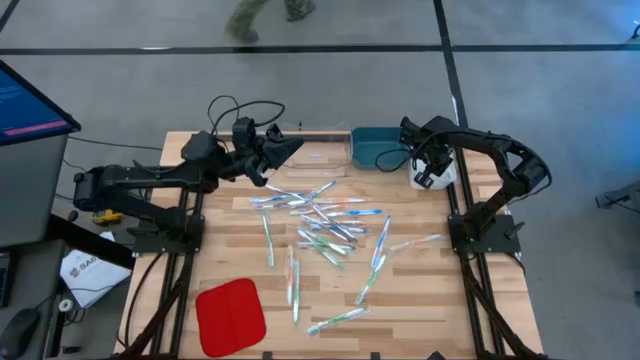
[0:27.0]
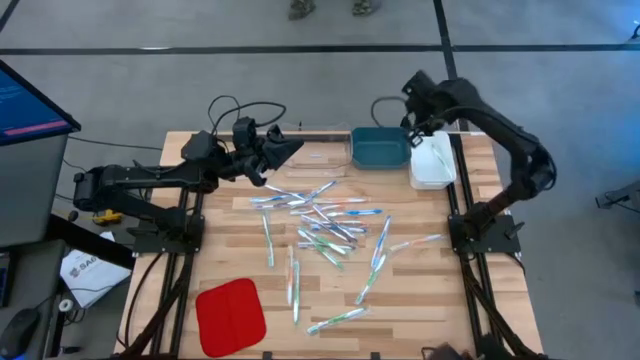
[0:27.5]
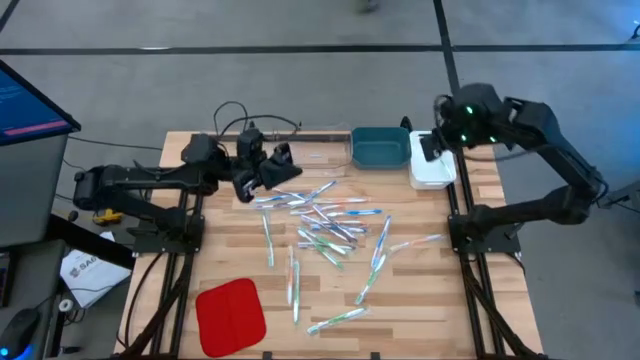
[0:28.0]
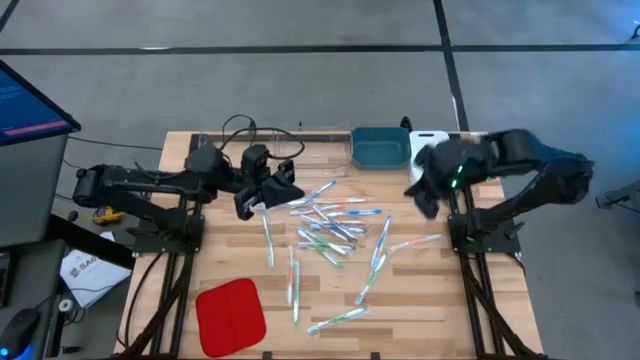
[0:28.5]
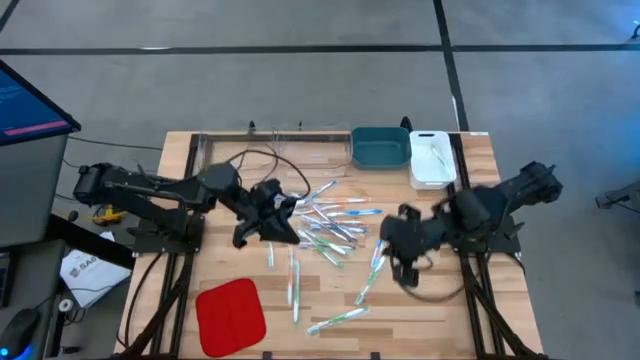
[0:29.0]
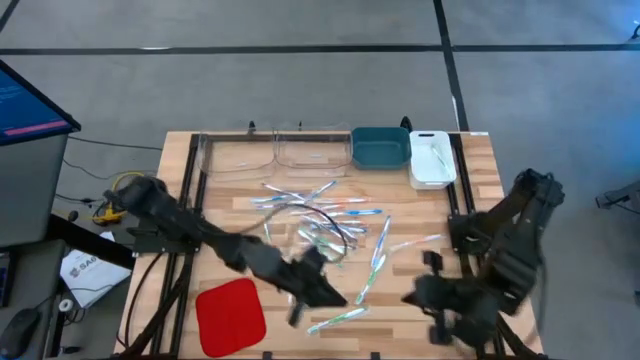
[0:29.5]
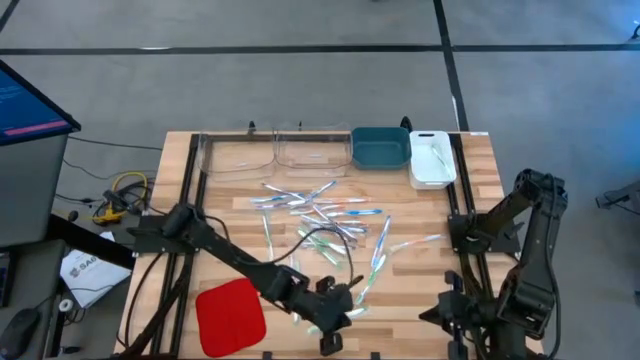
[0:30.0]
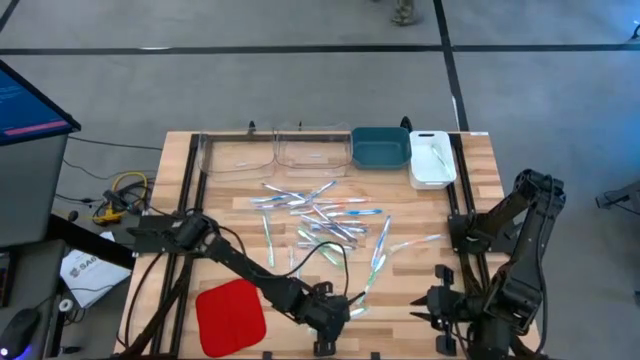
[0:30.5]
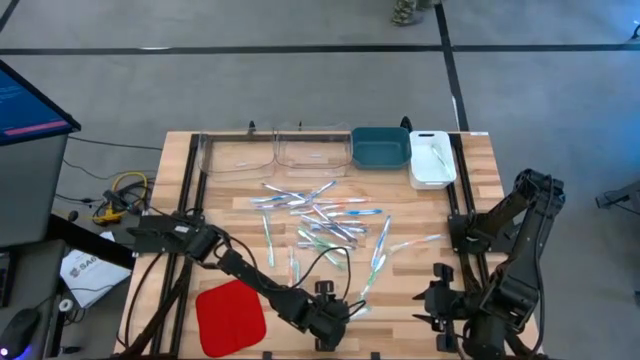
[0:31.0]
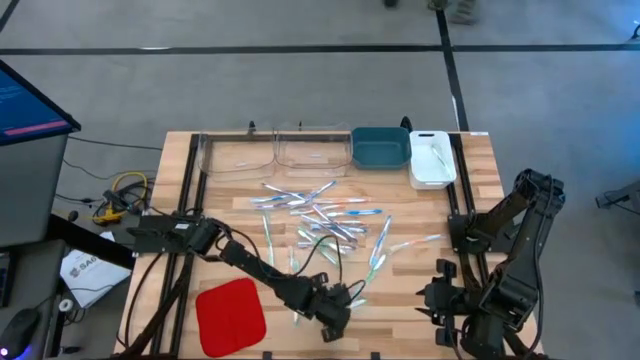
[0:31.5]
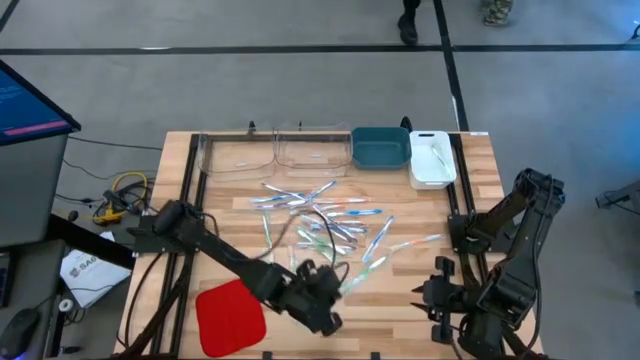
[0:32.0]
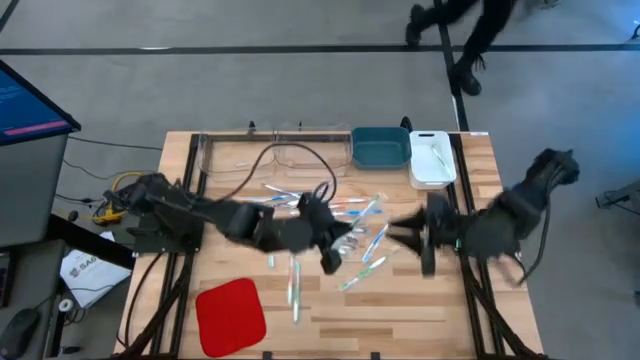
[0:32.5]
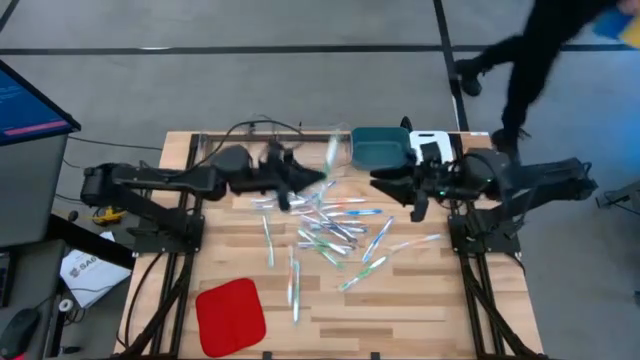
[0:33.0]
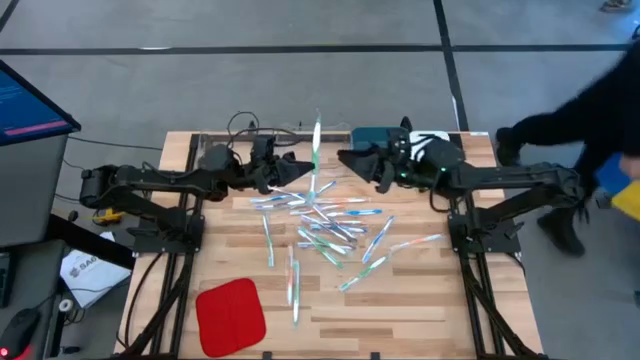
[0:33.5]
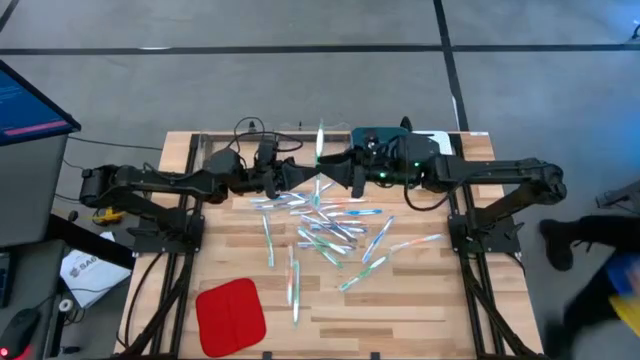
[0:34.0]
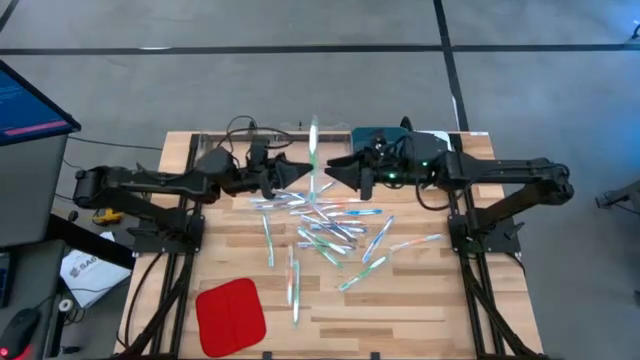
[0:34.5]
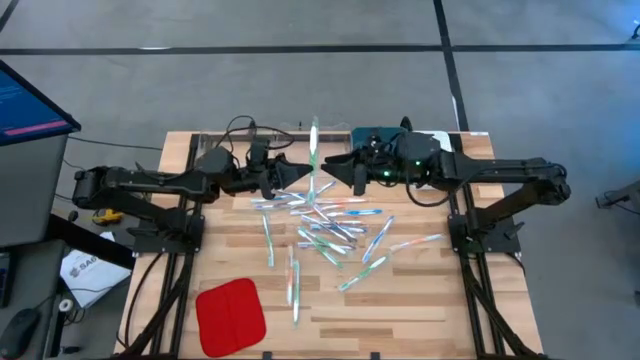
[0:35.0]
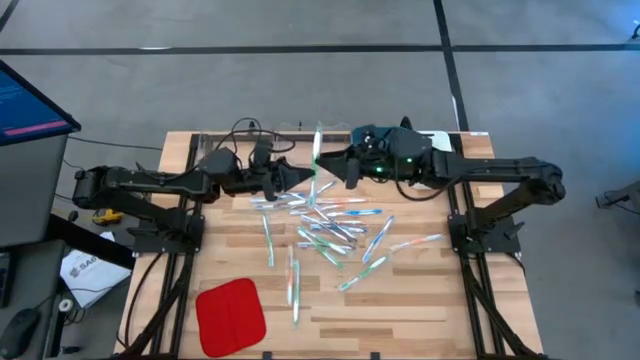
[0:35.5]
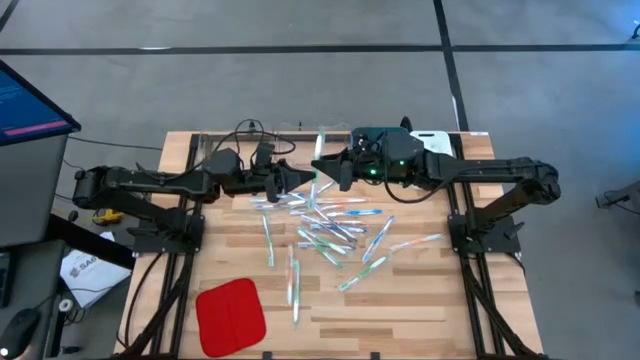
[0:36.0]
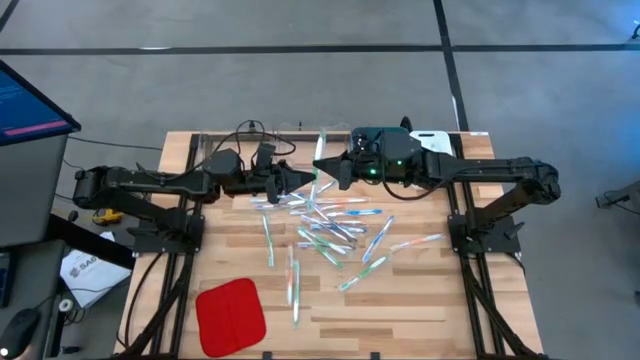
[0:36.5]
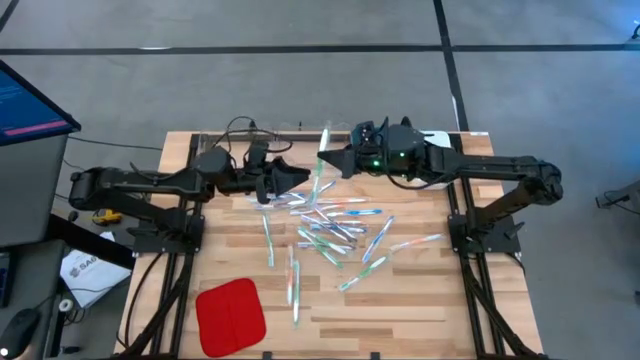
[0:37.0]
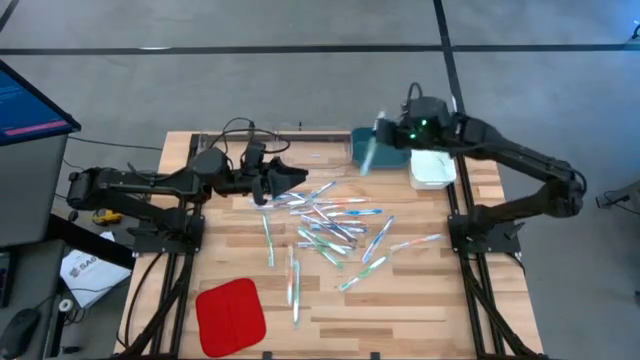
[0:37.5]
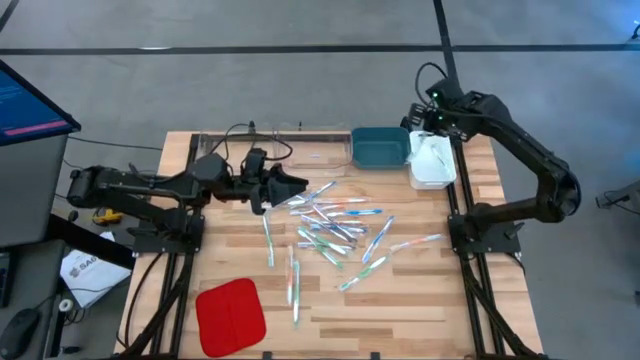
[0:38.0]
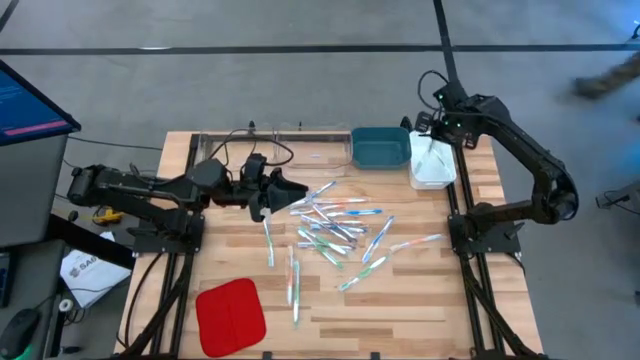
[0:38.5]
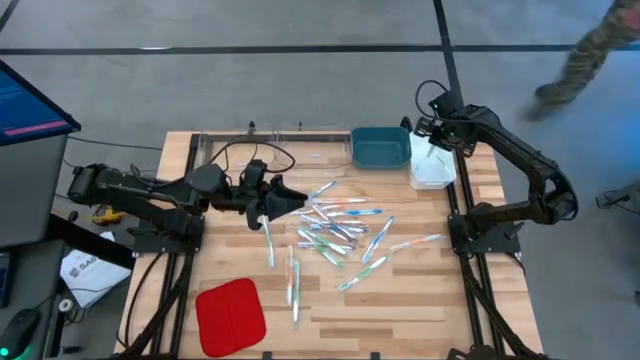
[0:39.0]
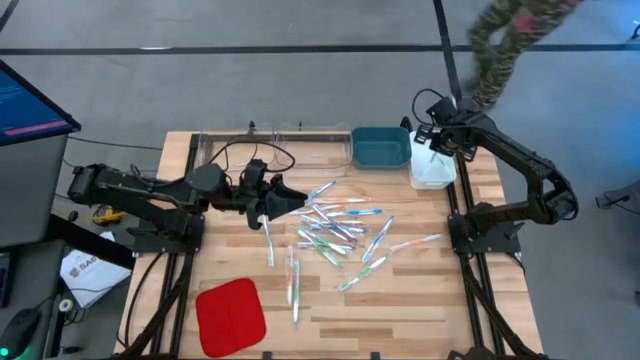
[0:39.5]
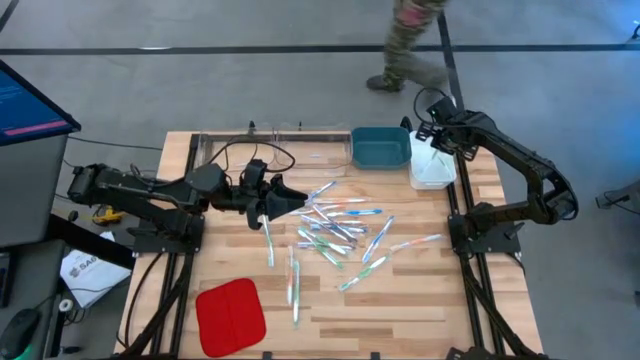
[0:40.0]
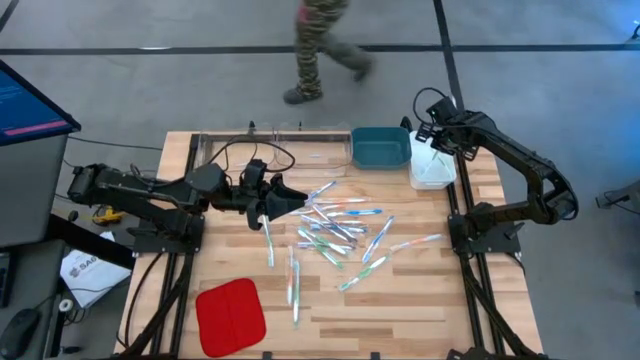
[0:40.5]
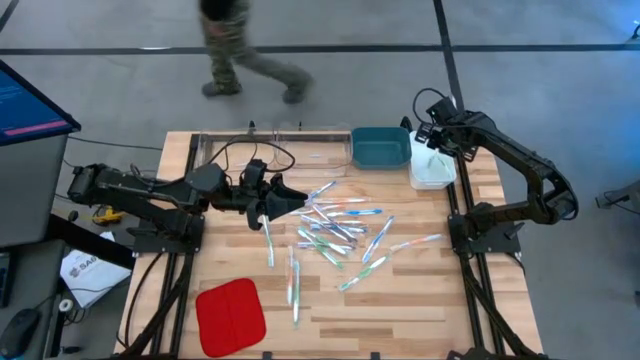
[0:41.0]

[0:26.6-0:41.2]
Task: Pick & Place Toothbrushes
Put the green toothbrush into the white bin

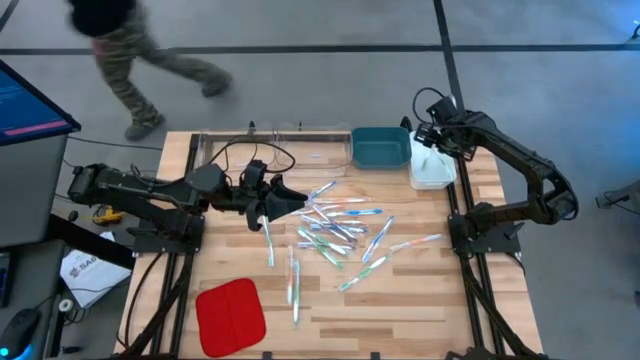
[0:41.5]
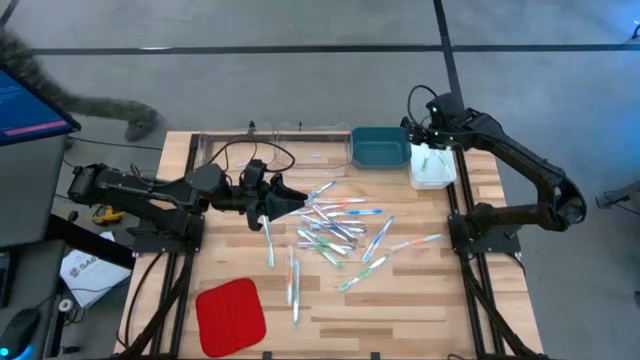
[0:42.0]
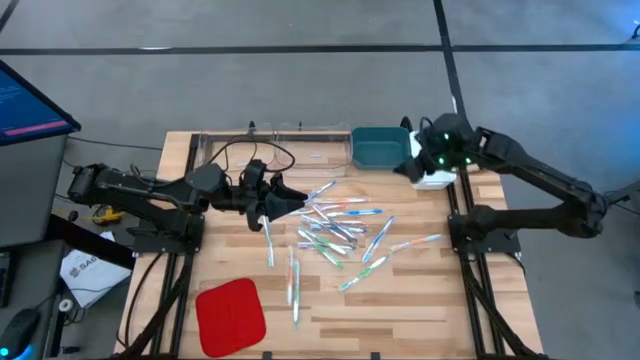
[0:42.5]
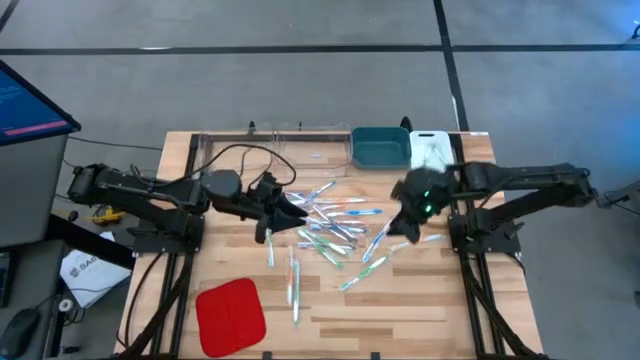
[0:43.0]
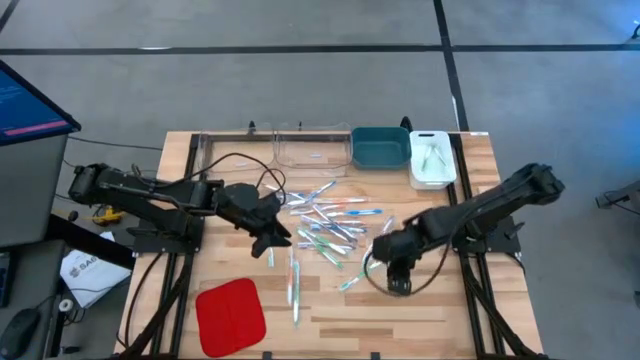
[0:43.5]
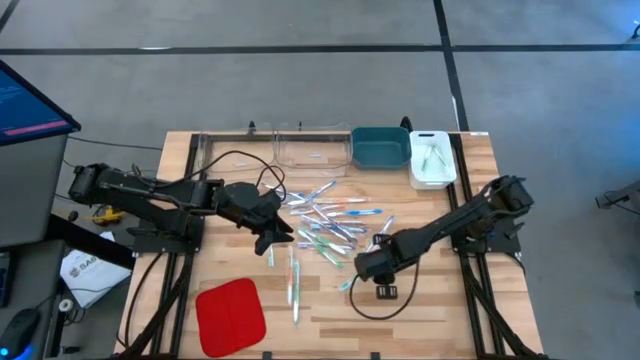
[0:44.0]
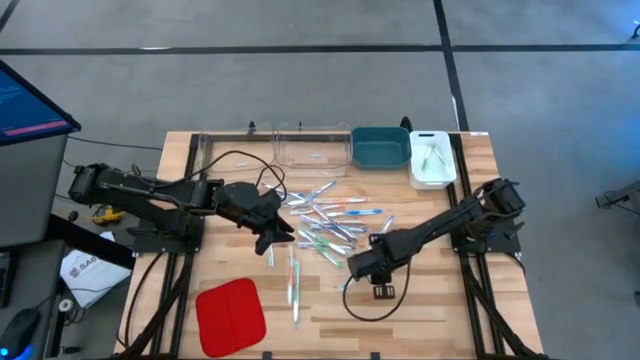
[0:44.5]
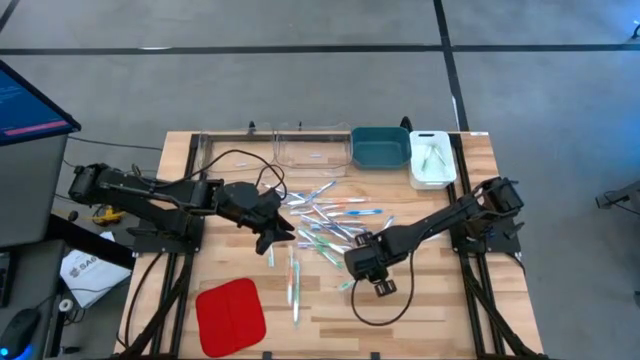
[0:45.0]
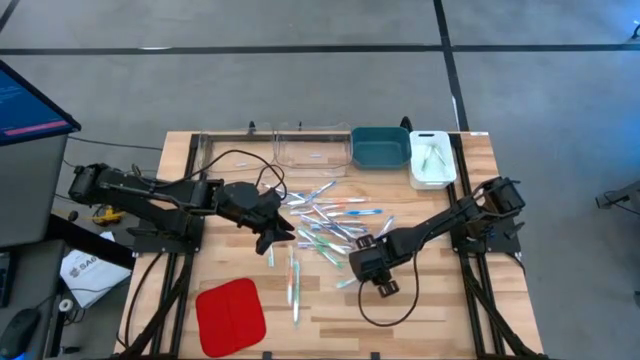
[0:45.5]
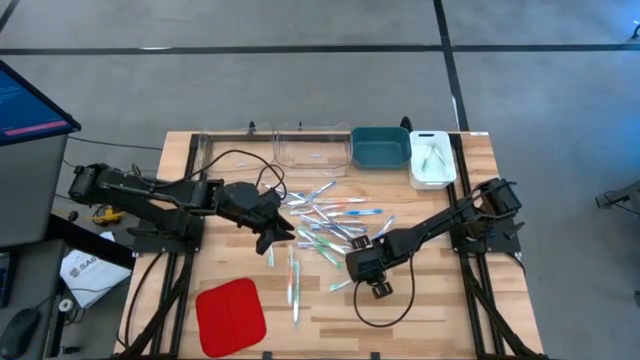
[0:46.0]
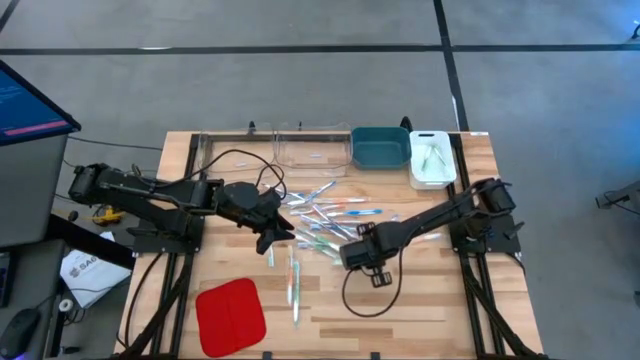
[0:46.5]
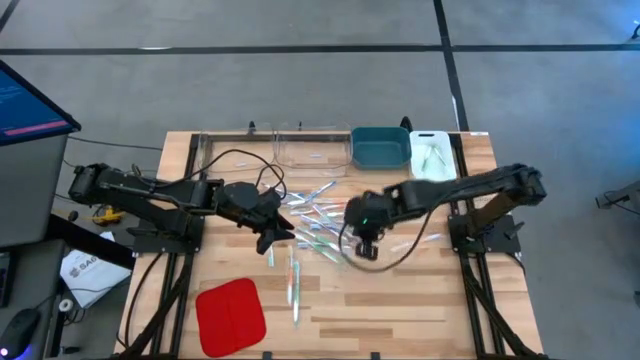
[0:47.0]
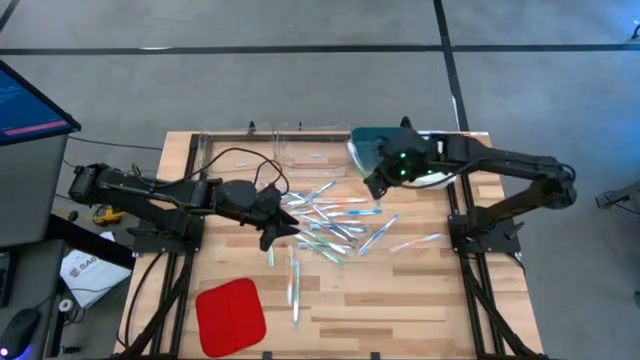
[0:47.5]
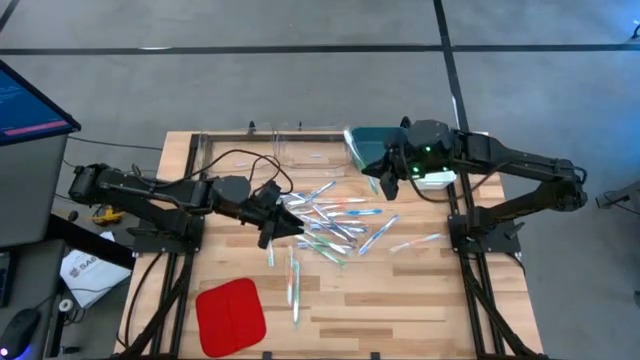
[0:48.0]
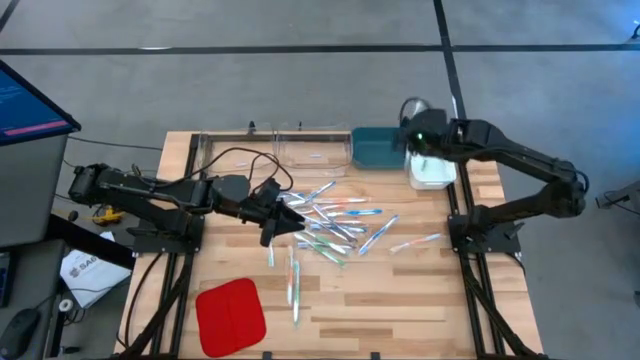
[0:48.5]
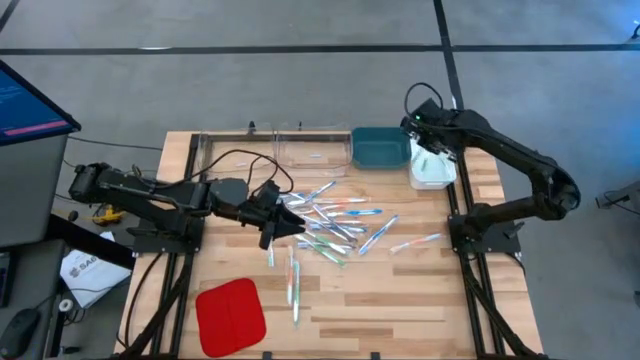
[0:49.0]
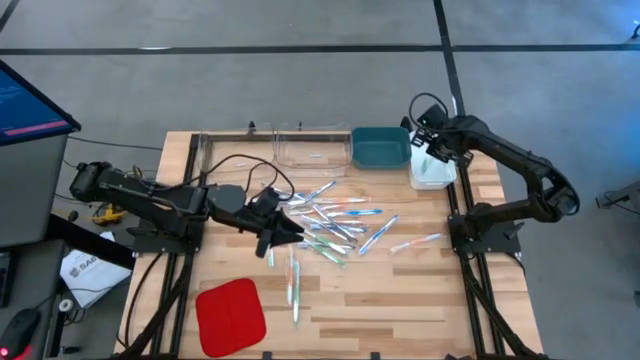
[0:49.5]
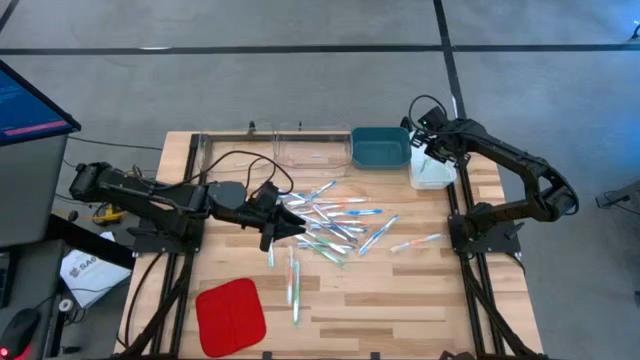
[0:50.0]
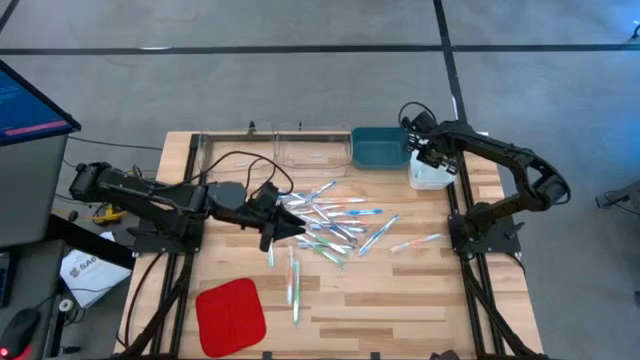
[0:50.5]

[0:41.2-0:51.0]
Put the green toothbrush into the white bin
